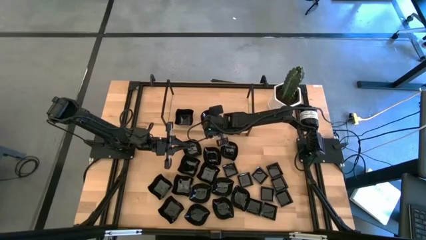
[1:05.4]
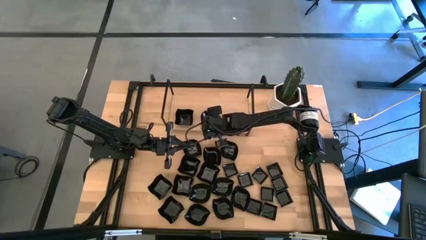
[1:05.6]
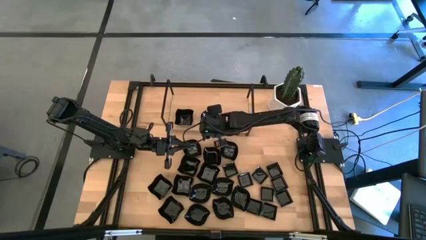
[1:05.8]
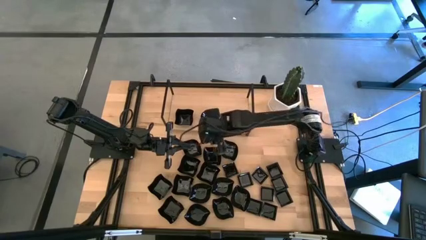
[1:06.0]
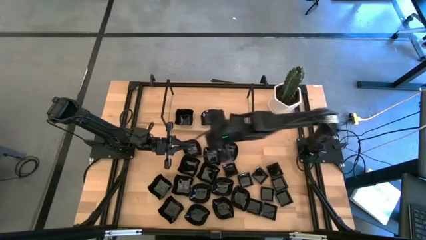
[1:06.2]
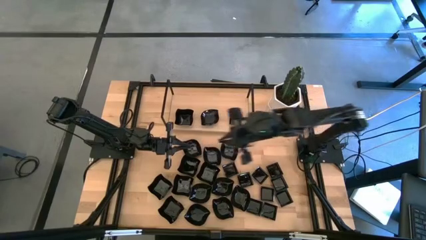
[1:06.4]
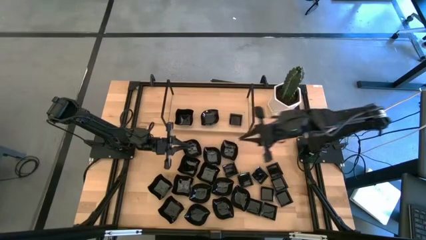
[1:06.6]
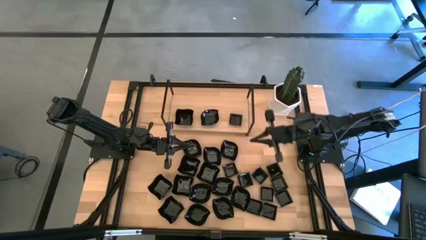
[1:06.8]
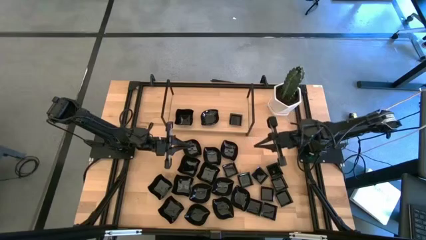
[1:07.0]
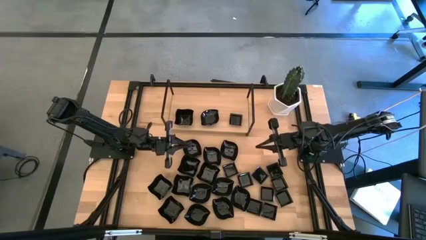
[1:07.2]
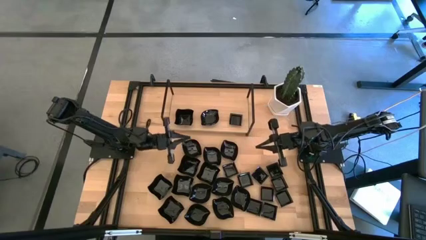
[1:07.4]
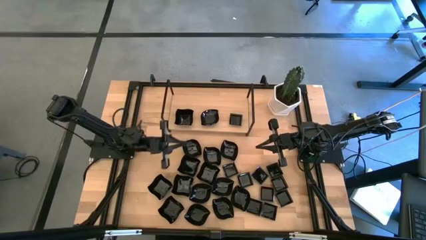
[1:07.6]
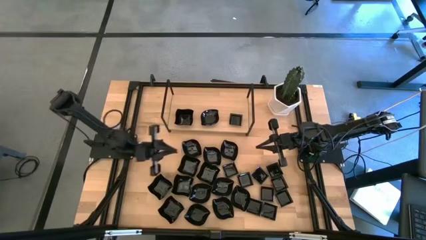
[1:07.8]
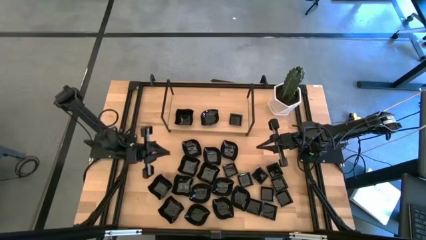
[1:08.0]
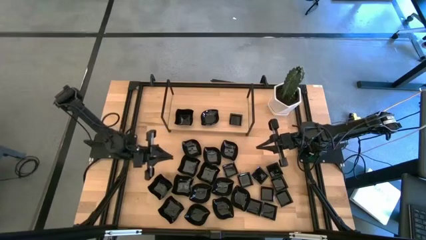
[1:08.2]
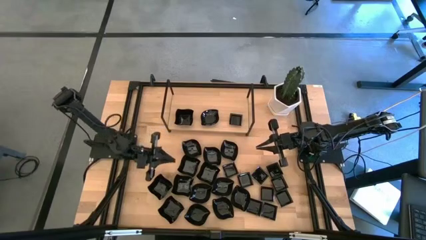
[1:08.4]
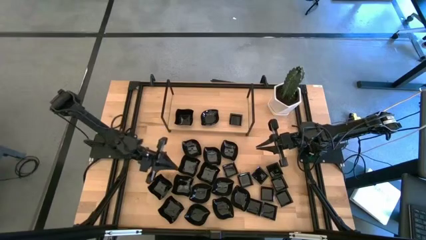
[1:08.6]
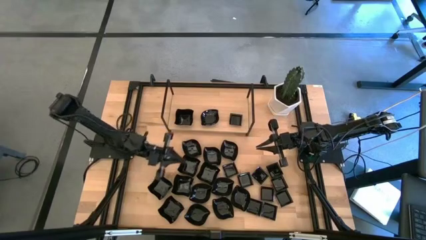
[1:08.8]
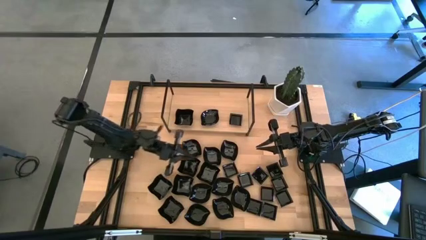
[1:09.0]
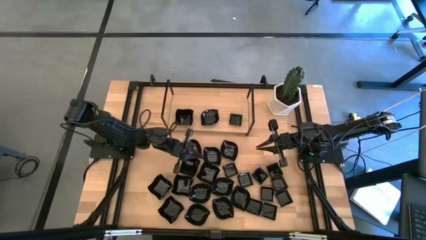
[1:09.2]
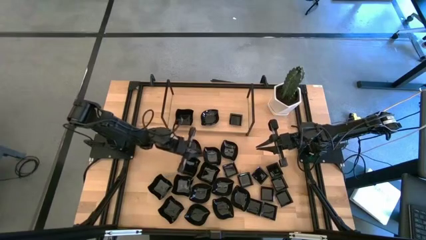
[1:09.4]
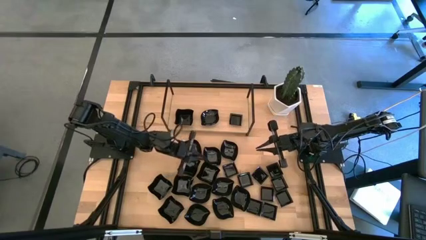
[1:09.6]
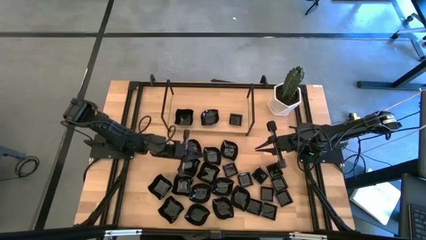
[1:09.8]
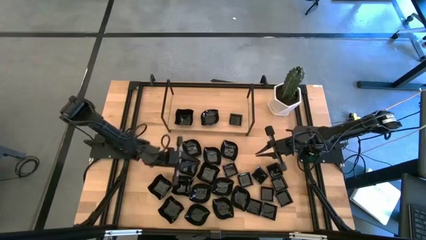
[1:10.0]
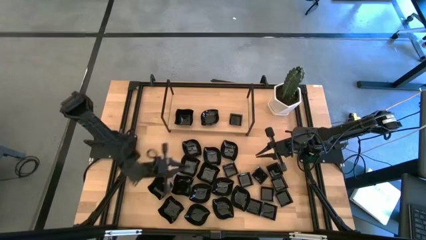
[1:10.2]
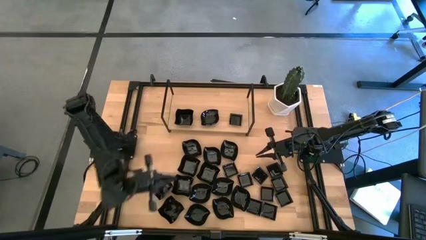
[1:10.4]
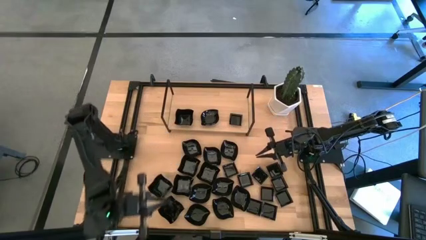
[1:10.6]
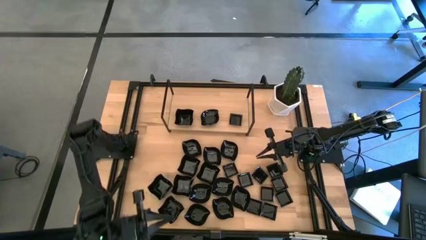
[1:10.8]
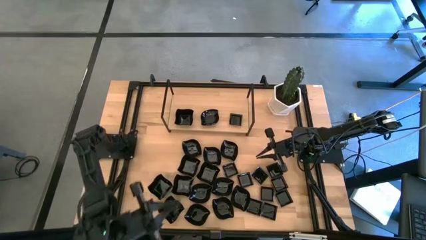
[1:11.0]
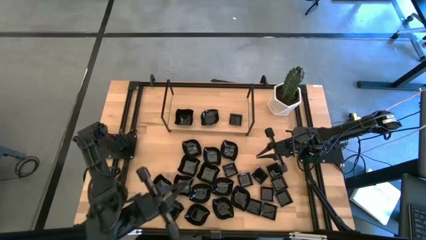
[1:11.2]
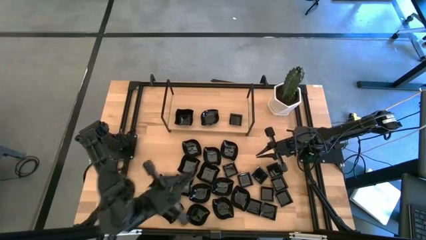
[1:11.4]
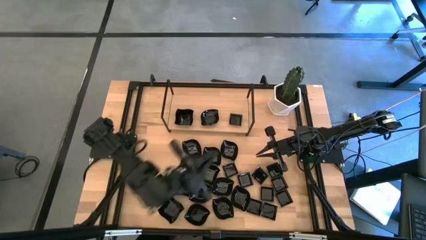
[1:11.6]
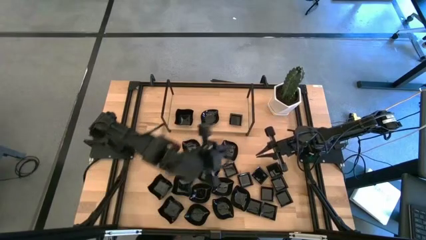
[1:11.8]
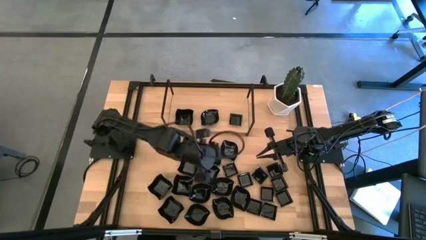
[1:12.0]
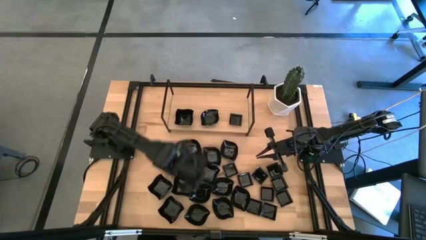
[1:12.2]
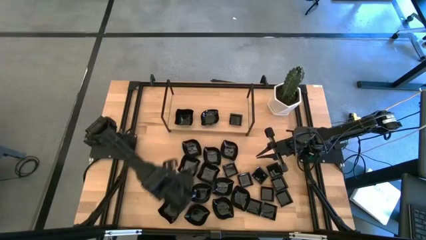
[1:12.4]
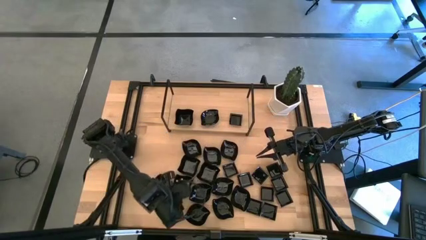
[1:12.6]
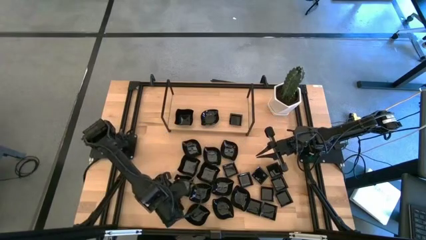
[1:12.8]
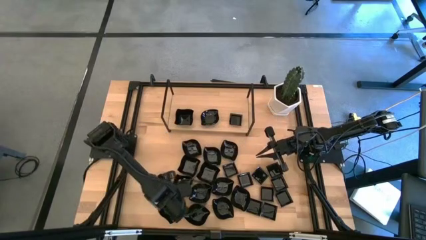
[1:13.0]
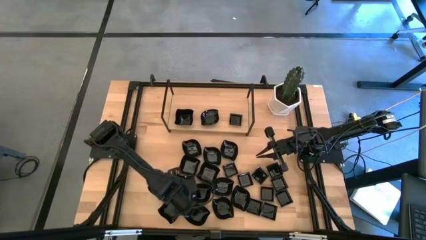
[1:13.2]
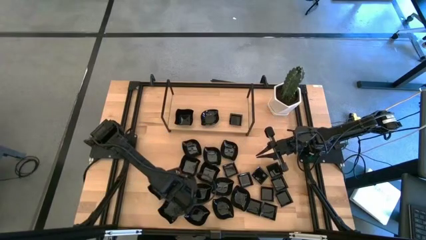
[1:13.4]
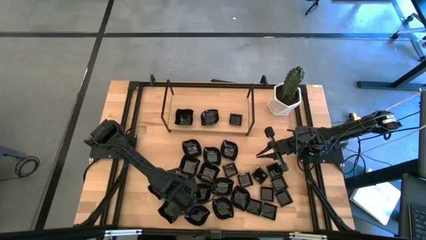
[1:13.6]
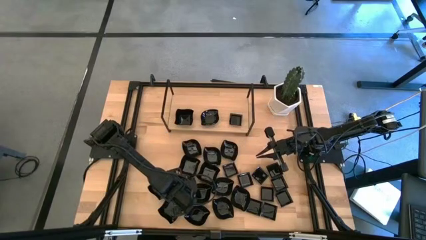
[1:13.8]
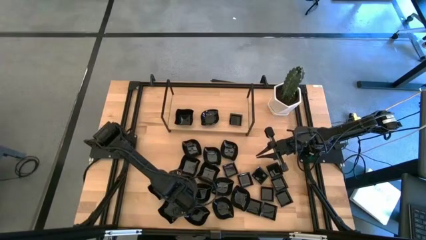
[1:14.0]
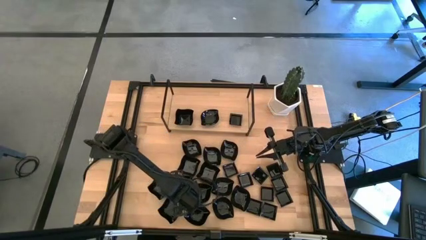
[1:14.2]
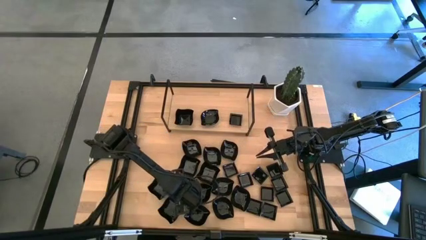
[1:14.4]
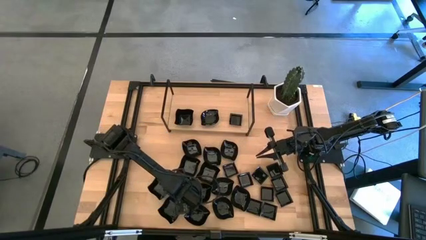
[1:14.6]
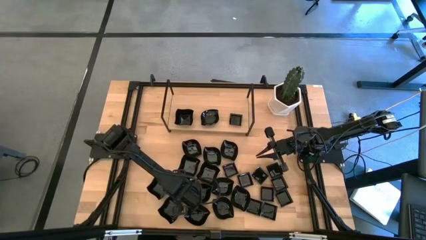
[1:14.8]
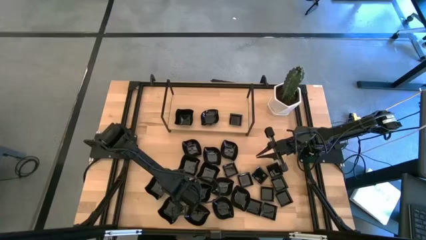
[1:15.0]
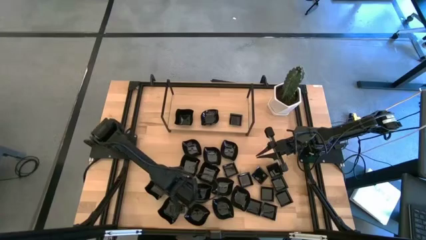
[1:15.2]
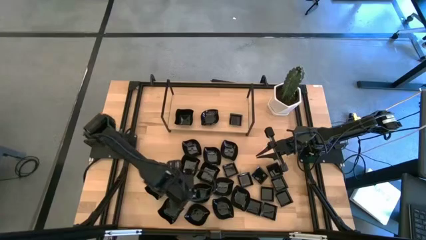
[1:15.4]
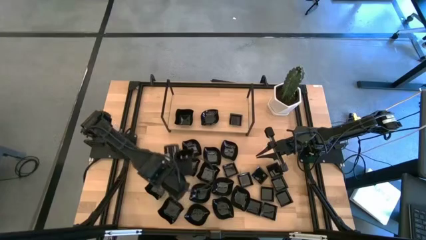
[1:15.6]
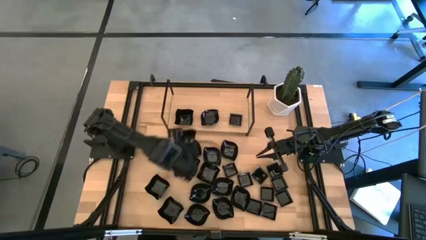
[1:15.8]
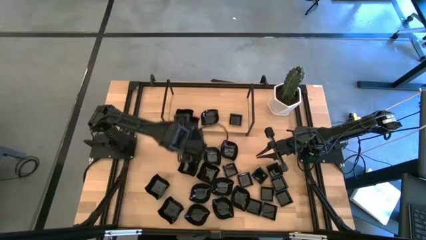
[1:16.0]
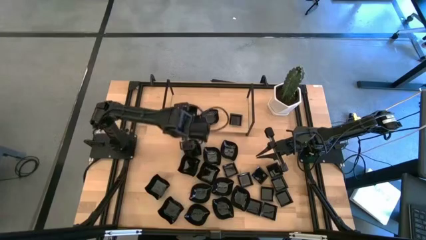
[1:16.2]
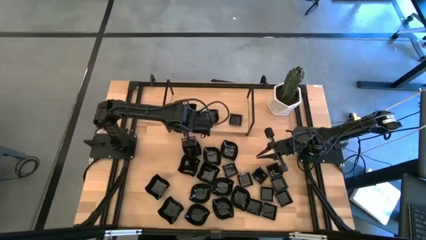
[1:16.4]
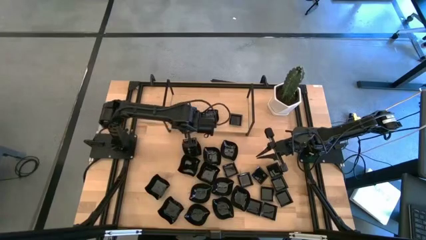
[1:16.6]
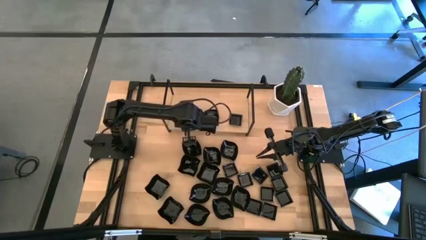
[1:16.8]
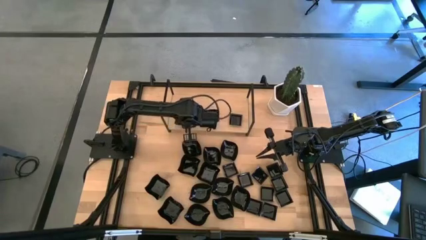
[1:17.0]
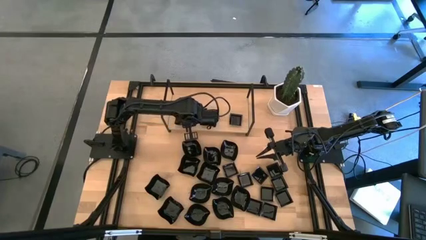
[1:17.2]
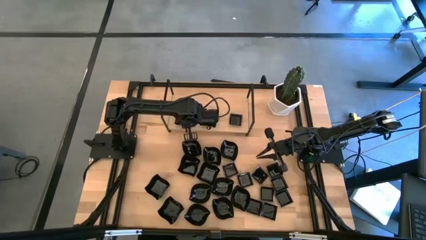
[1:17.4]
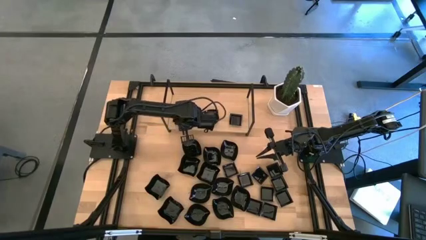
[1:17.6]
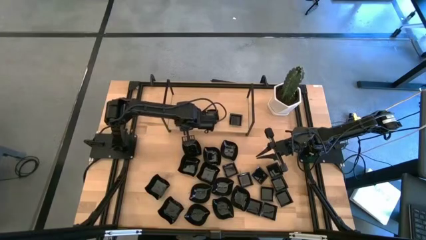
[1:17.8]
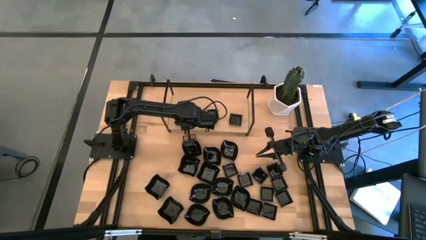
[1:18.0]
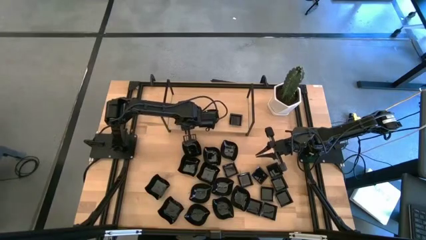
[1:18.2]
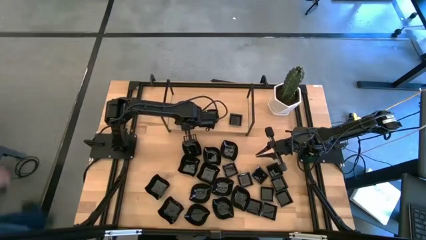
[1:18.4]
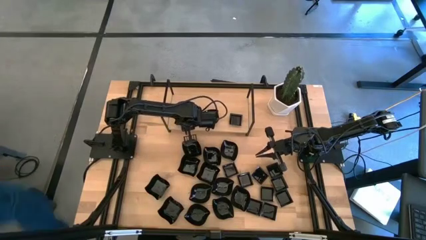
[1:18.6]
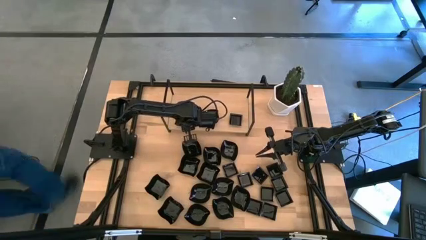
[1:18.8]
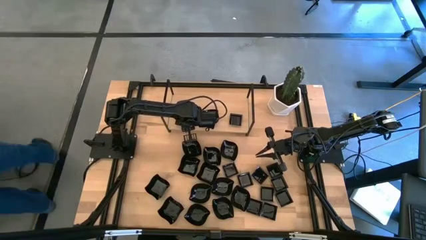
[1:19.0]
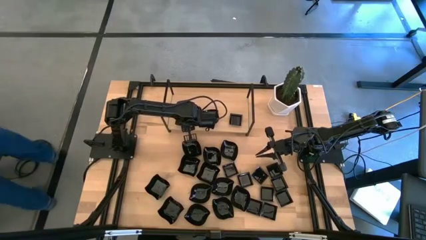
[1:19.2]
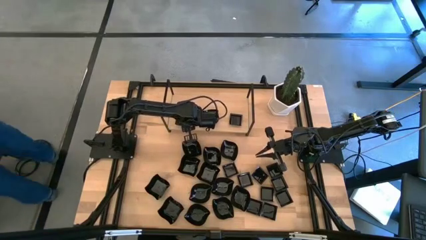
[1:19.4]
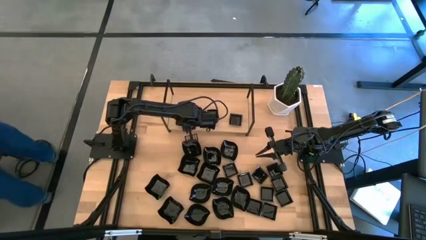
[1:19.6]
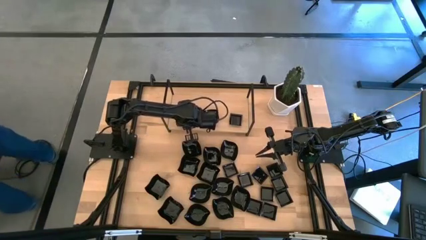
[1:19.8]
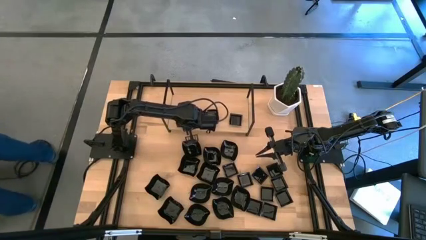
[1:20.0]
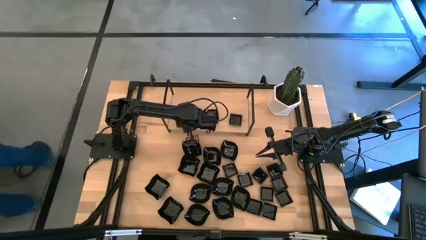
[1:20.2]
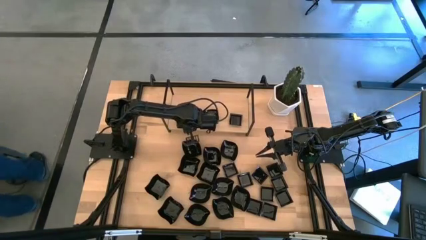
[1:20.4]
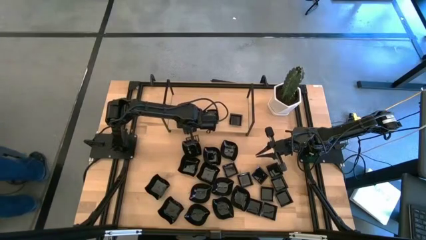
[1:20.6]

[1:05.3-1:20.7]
Task: Pick & Place Mini shaped plates
Stack the distorted square plate on the top of the distorted square plate on the shelf

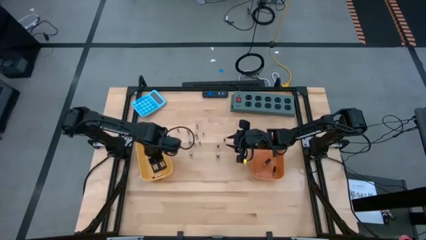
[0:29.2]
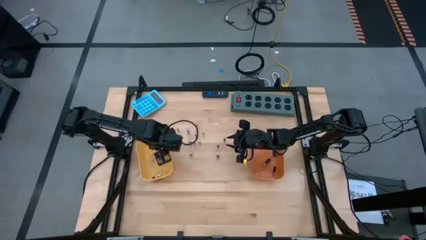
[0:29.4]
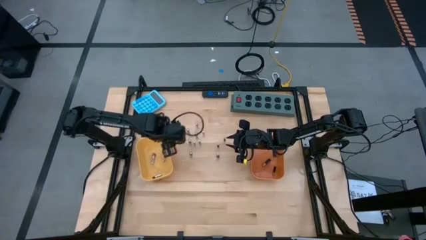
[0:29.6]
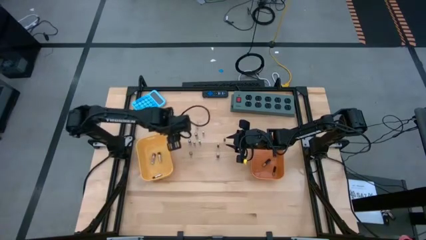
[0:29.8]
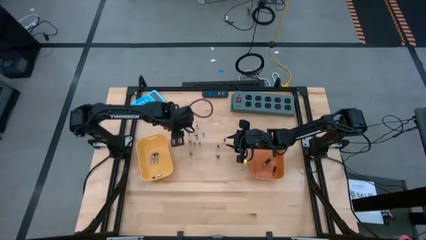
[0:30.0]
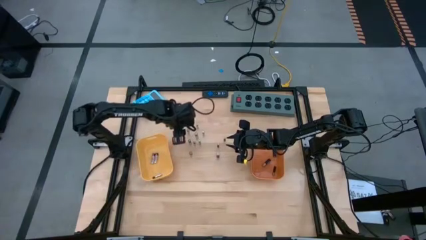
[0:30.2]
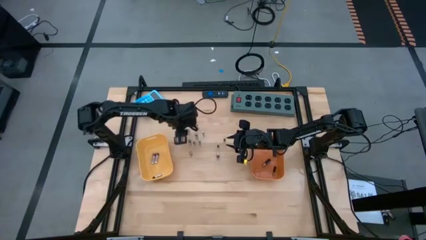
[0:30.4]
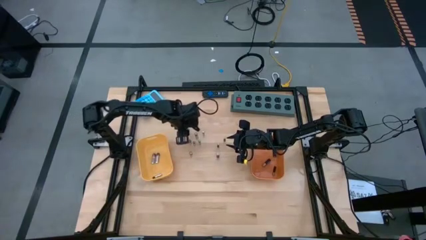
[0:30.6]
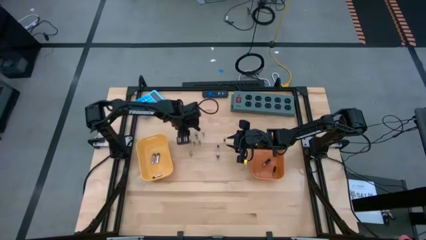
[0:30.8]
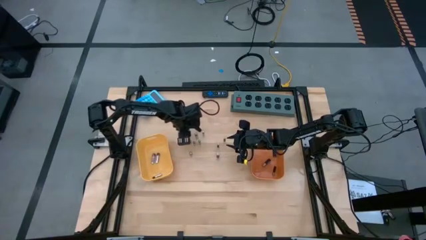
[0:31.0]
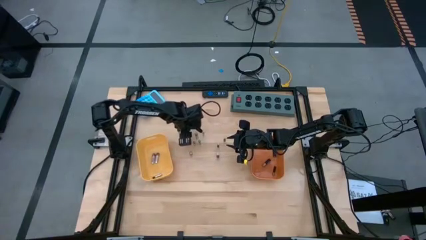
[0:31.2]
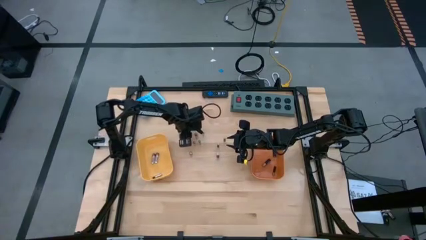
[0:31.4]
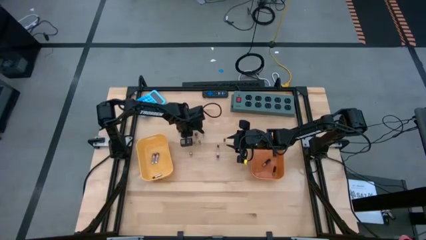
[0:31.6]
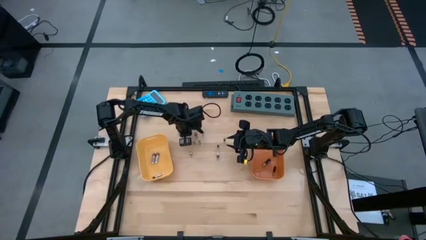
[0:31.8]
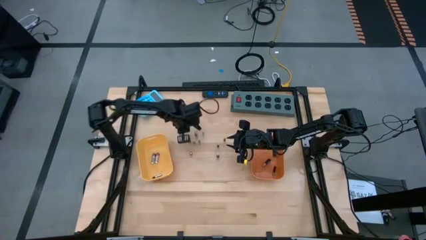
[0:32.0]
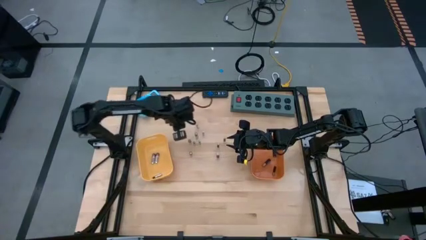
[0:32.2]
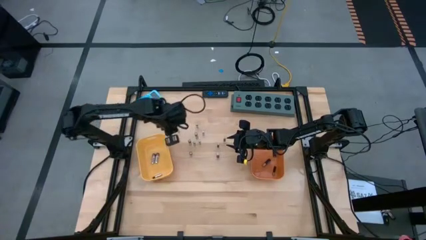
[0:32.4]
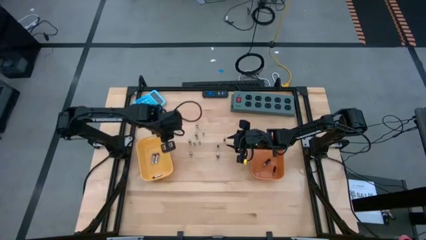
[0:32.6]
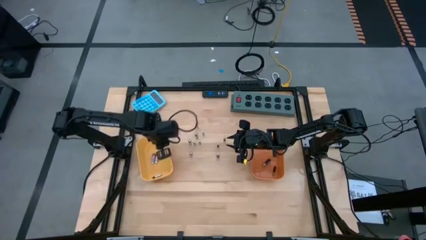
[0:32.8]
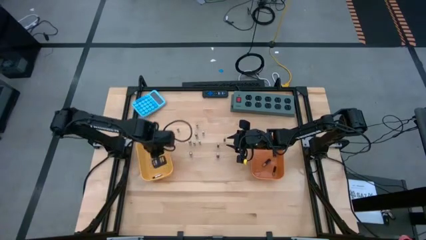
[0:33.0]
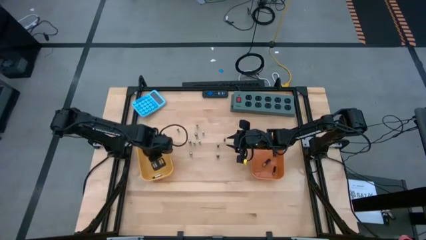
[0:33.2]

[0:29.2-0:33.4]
Task: Sort batteries
Put the silver battery into the yellow bin
